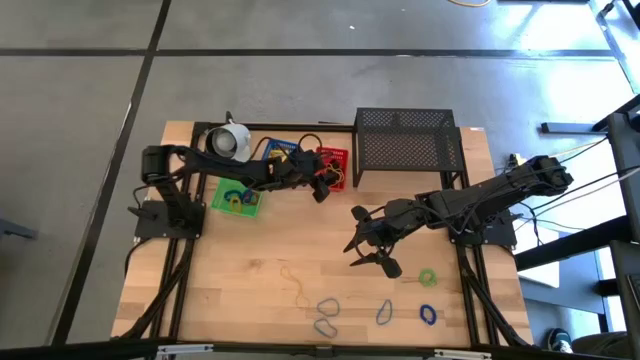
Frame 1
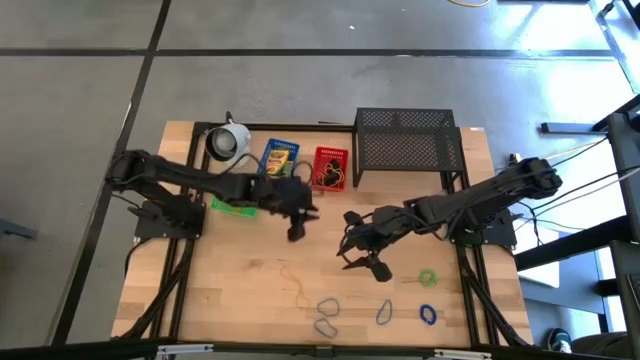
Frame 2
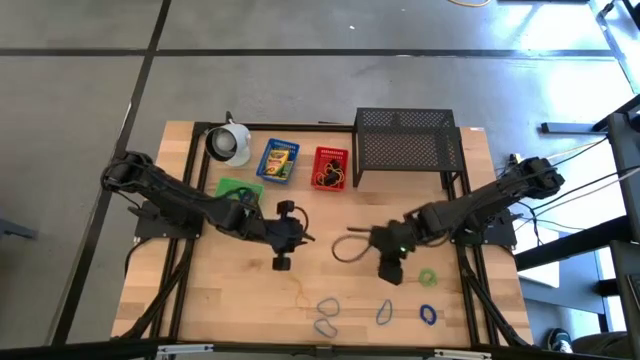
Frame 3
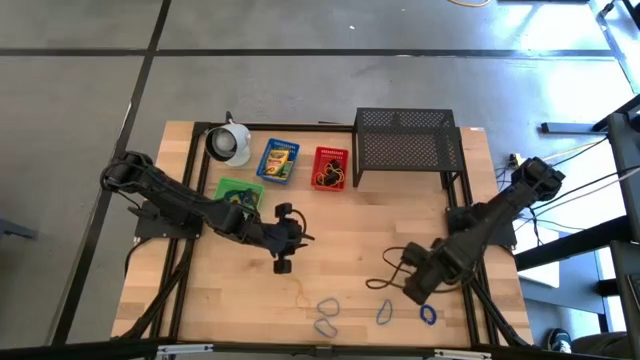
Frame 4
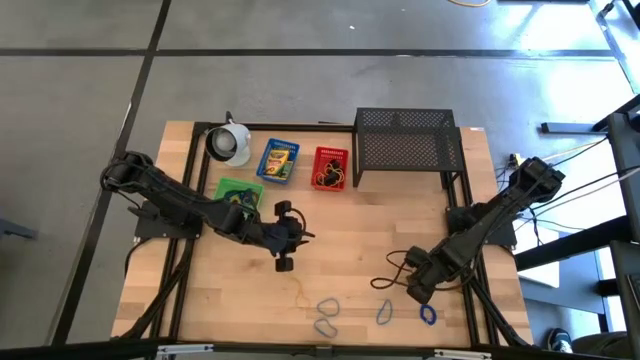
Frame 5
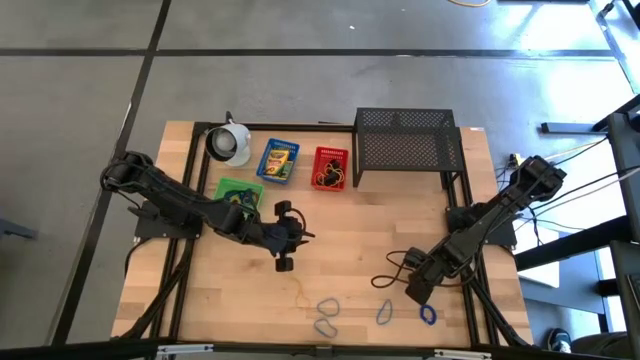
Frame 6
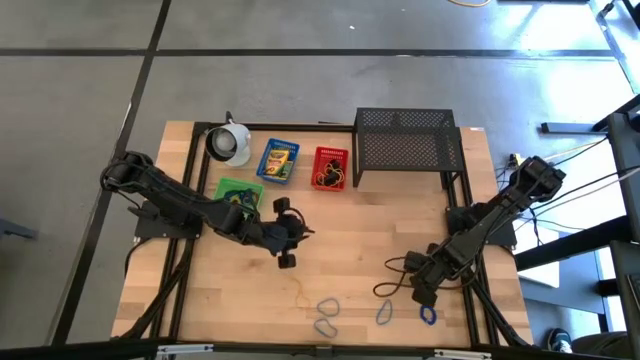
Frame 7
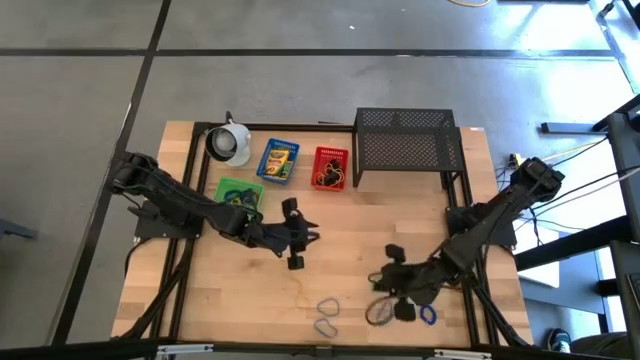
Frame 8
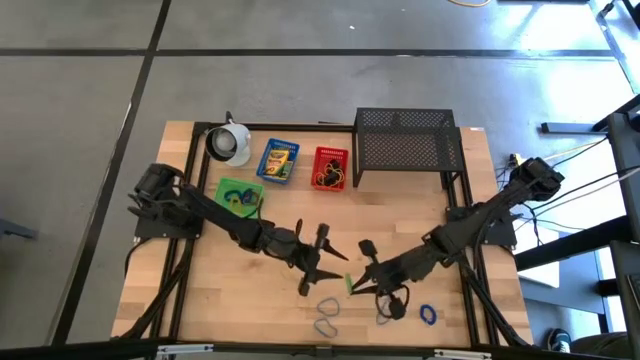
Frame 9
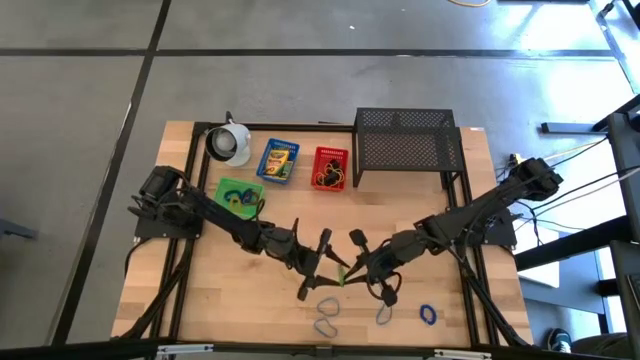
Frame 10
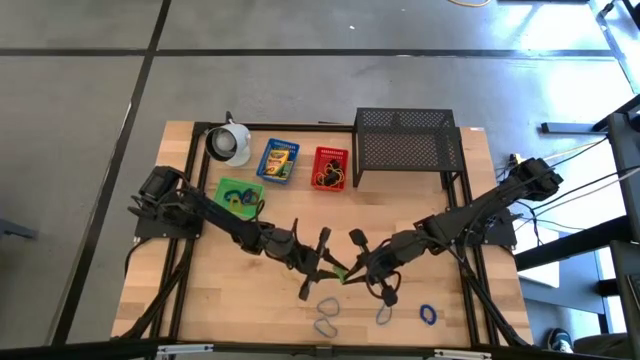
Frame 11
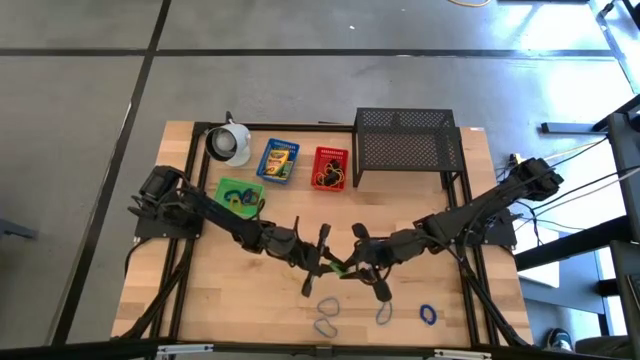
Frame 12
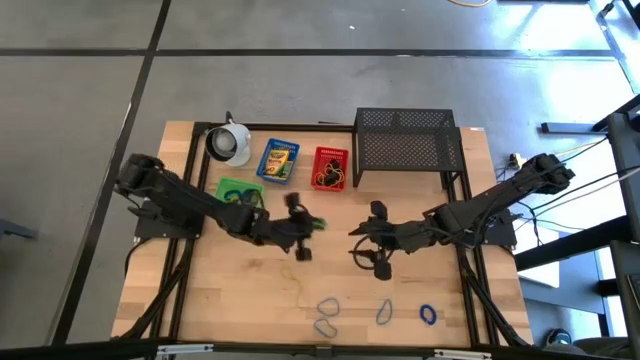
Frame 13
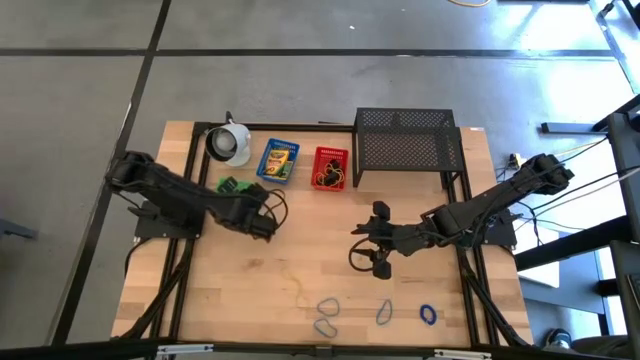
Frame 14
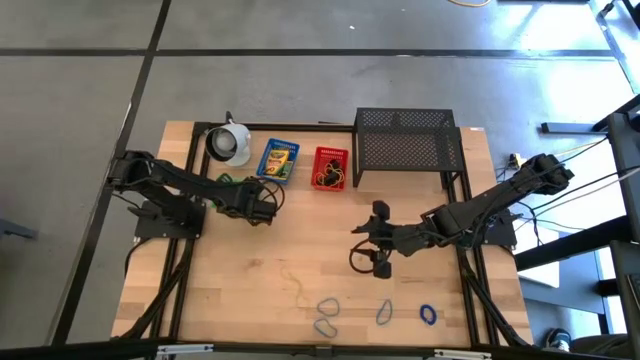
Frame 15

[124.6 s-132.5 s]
Task: Pick & Place Office Desk Supplies
Put the green spring keychain into the green bin

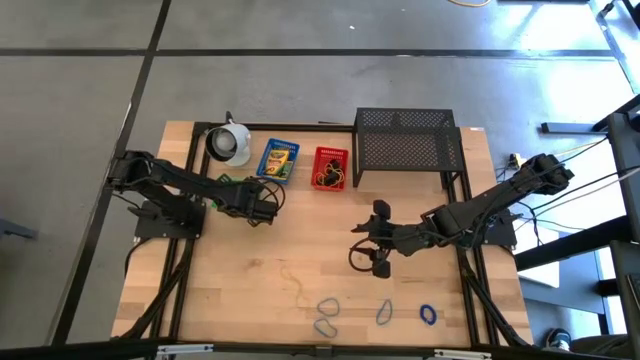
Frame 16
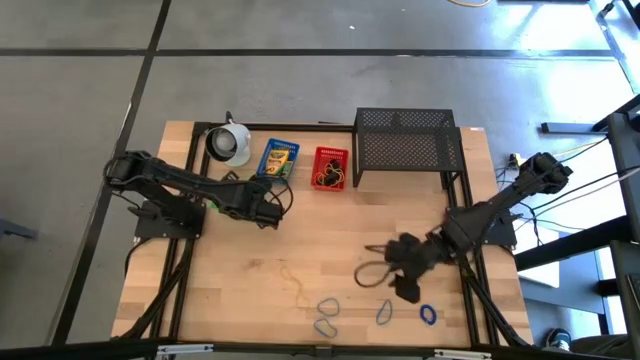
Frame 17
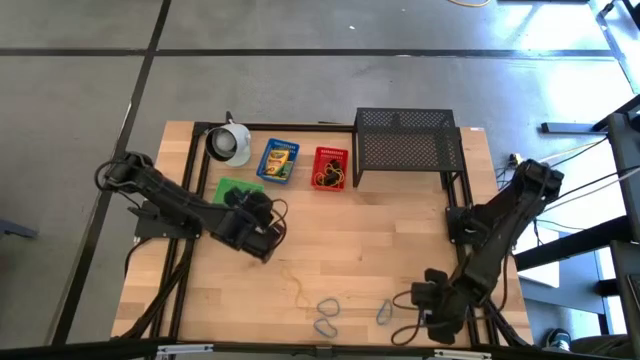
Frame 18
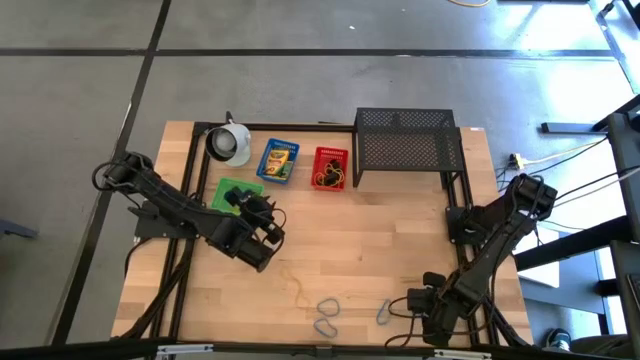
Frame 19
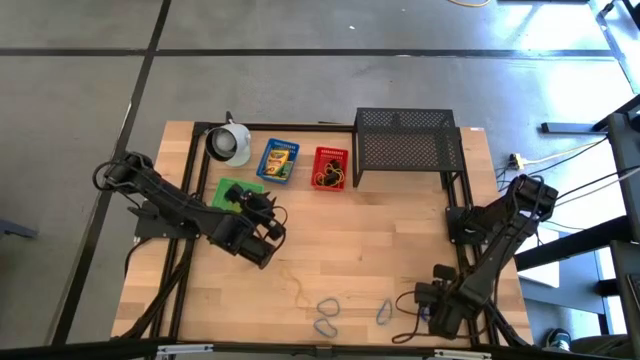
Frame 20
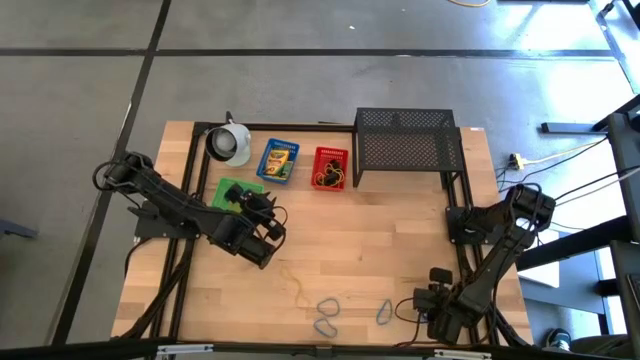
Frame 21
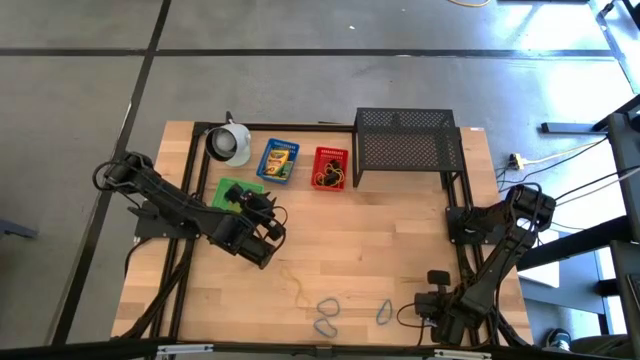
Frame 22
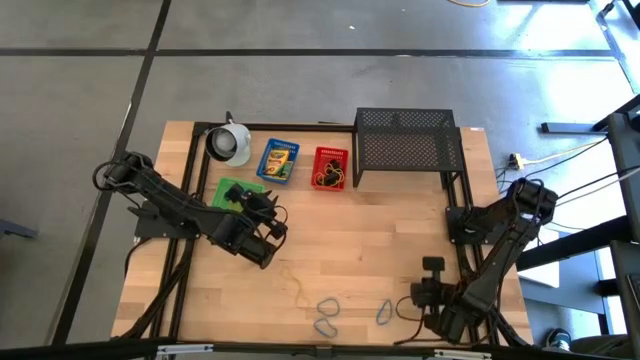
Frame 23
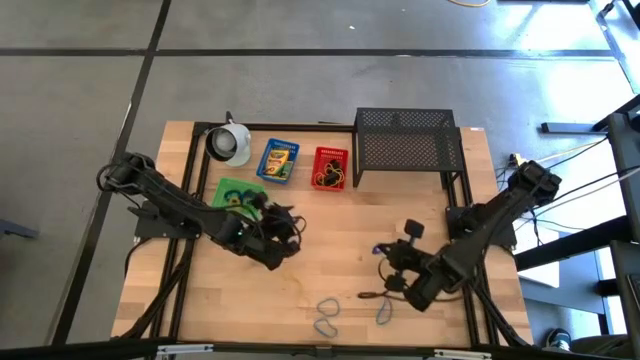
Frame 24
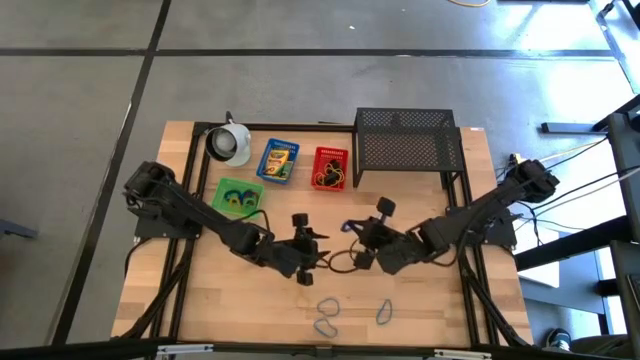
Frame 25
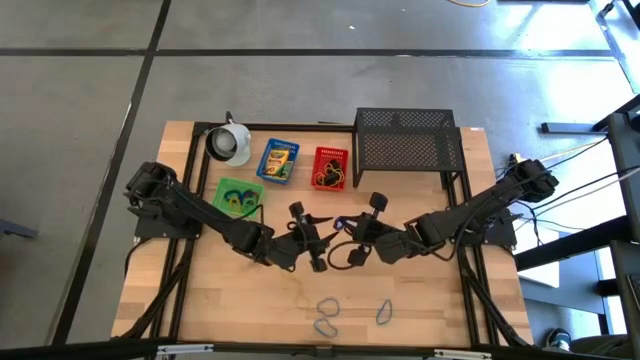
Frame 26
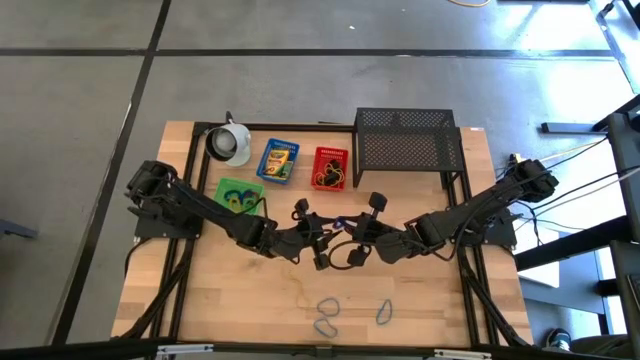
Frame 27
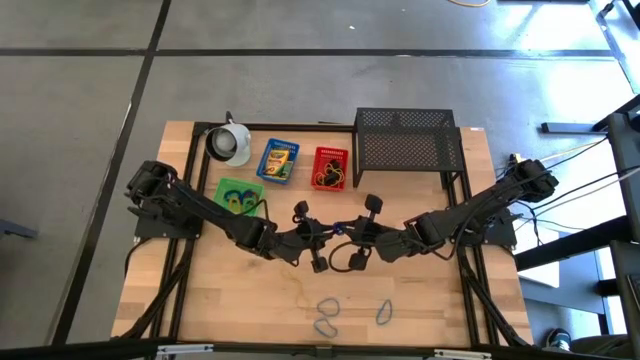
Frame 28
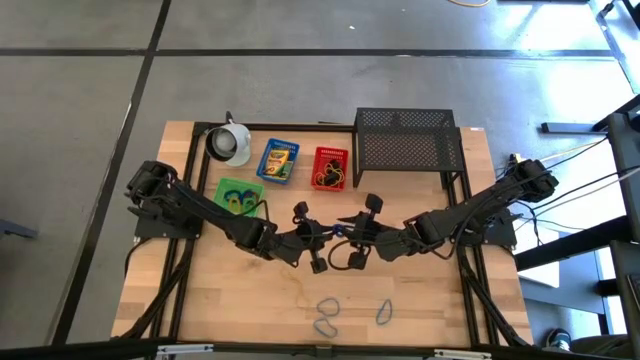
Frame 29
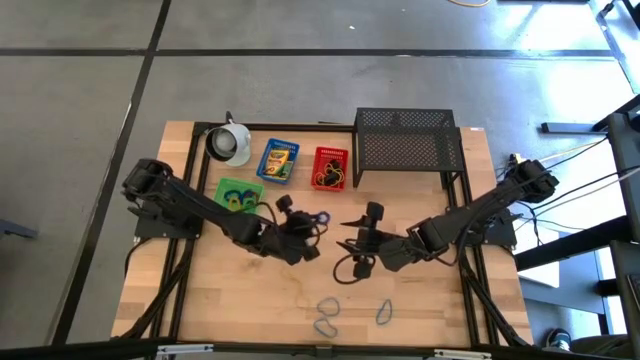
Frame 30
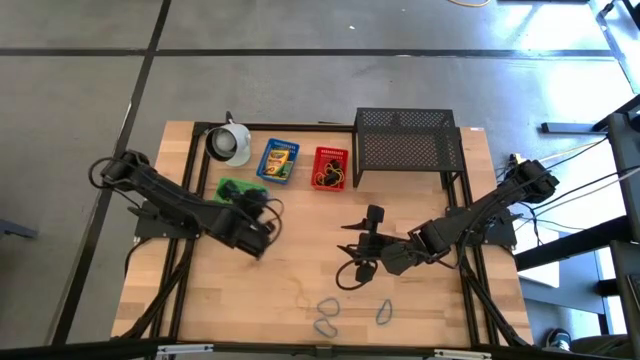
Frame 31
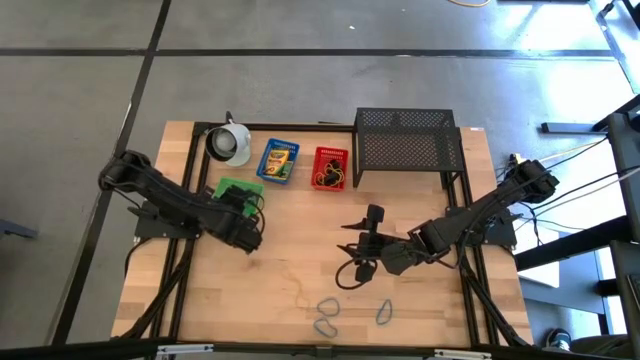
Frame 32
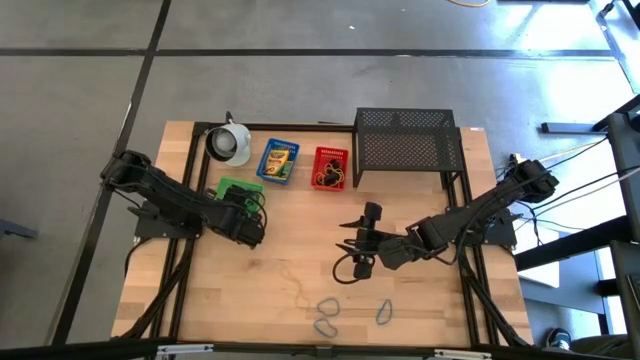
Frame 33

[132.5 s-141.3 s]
Put the blue spring keychain into the green bin

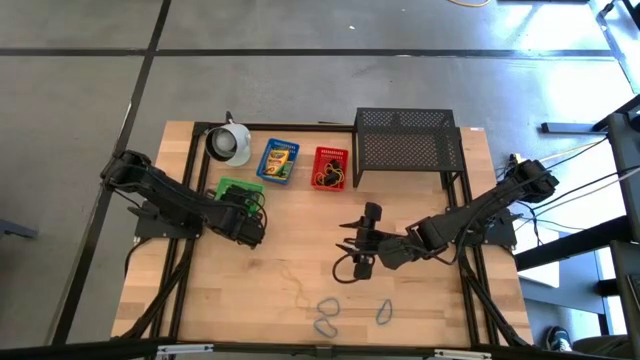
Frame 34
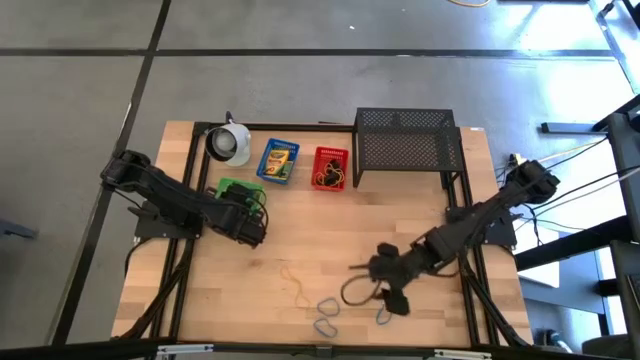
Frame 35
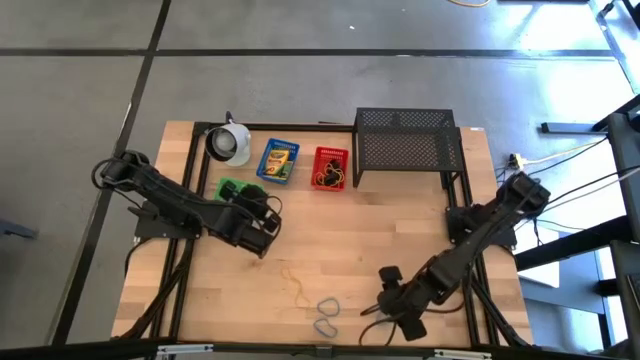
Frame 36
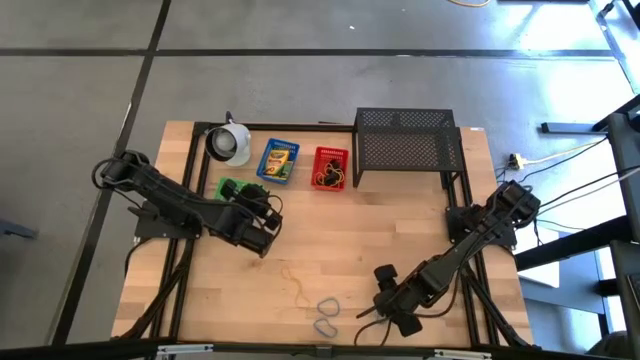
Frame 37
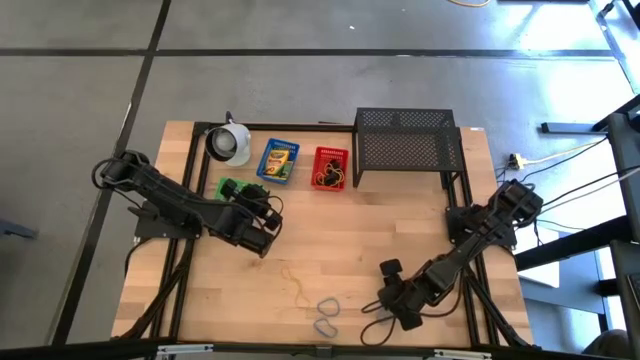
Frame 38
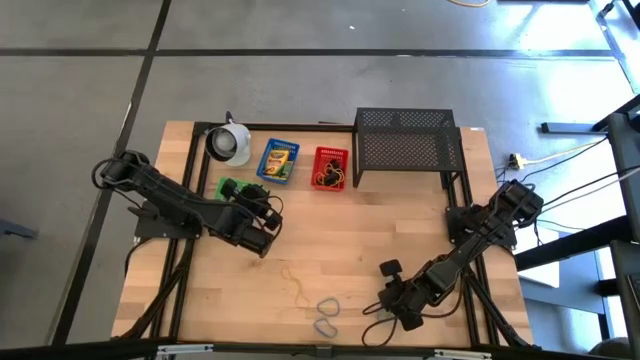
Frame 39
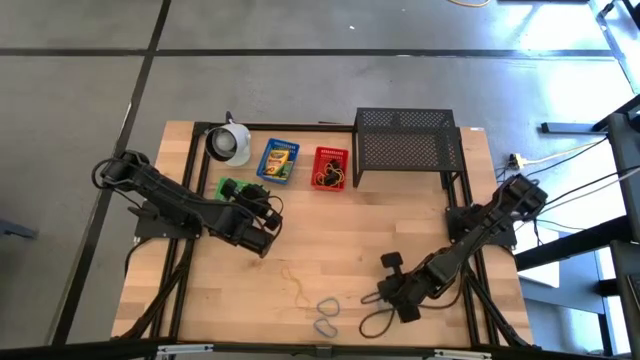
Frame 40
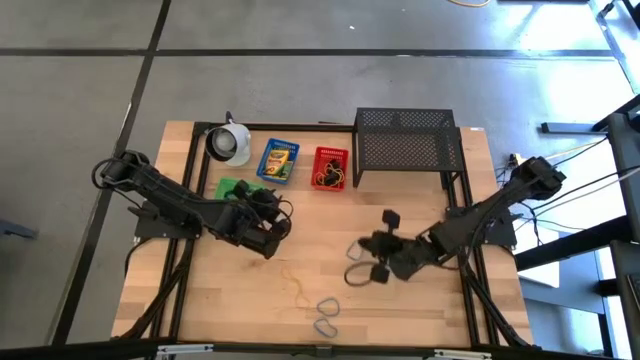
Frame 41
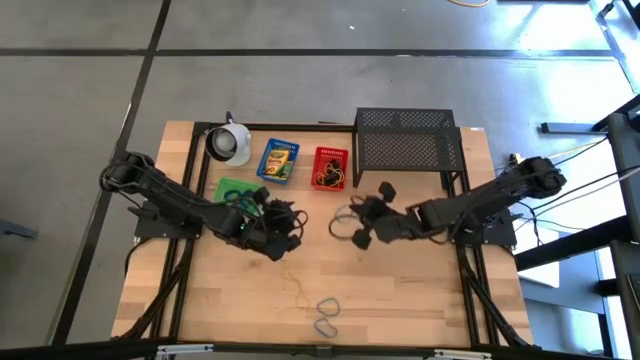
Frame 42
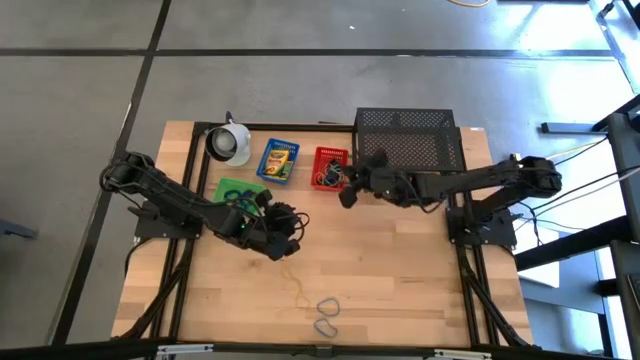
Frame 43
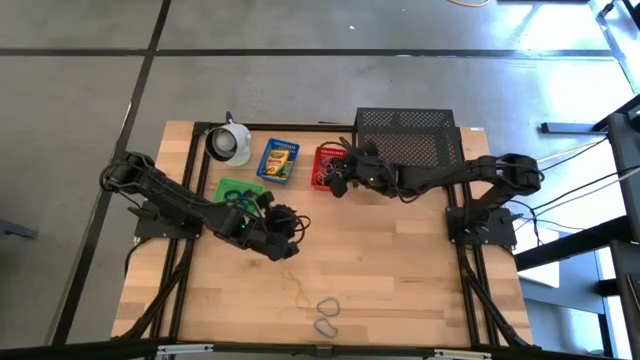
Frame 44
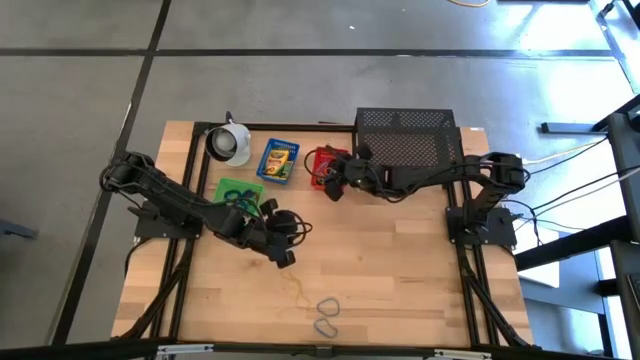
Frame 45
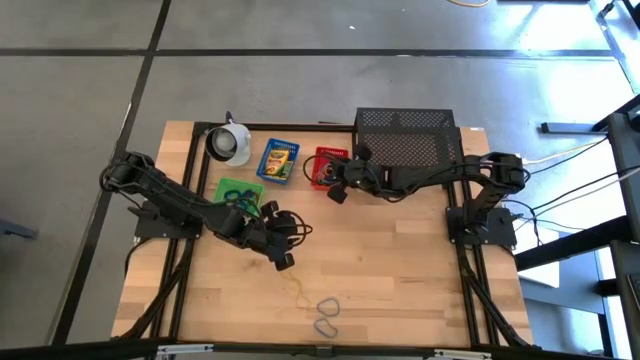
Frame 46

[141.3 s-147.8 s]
Put the blue rubber band into the red bin
